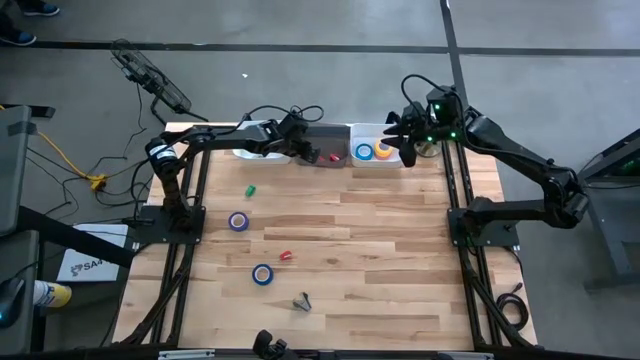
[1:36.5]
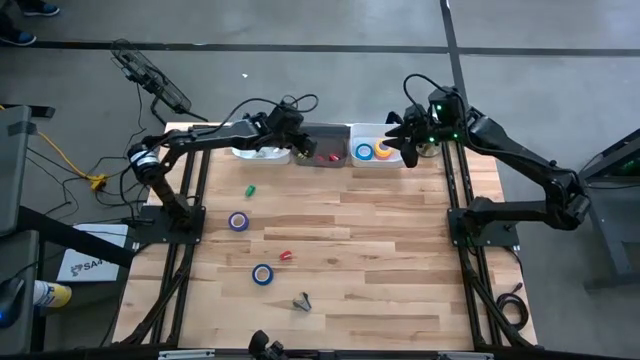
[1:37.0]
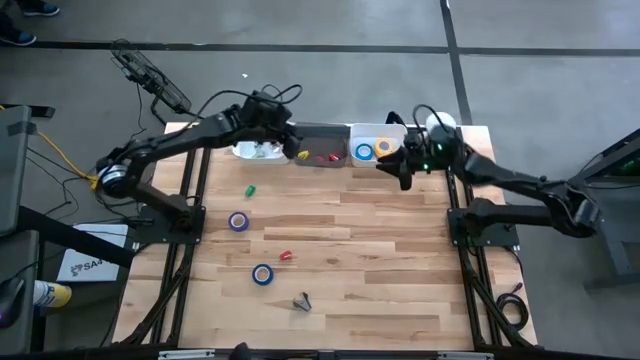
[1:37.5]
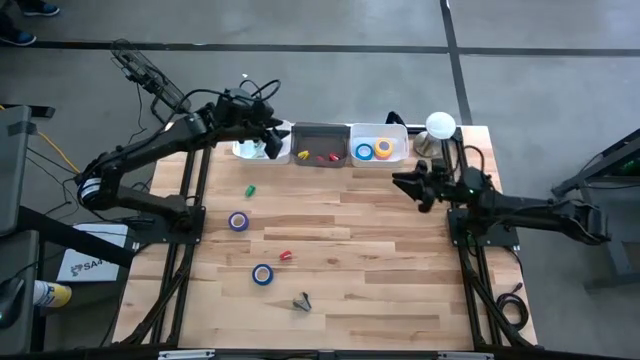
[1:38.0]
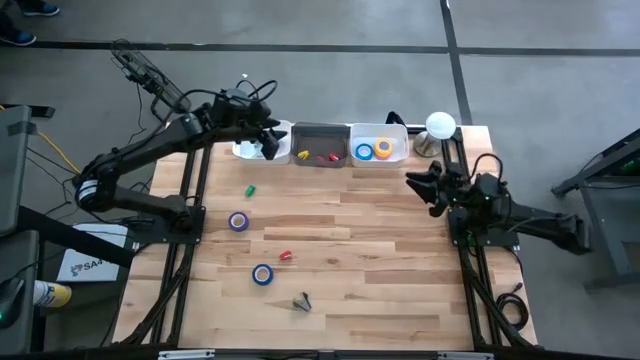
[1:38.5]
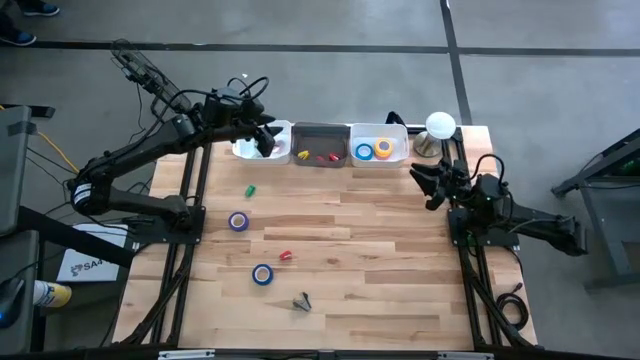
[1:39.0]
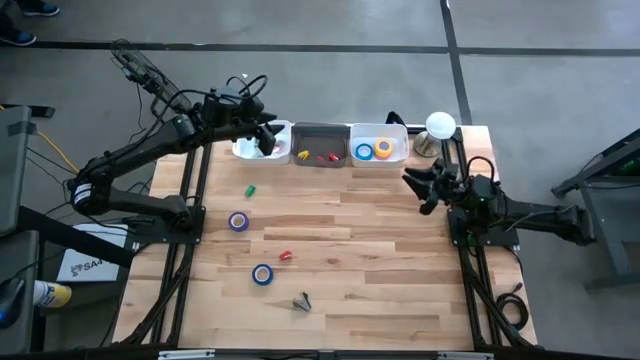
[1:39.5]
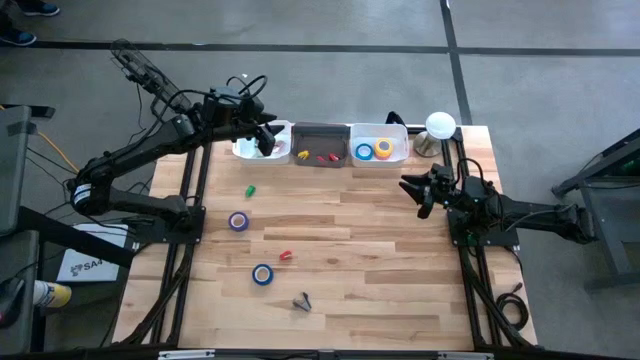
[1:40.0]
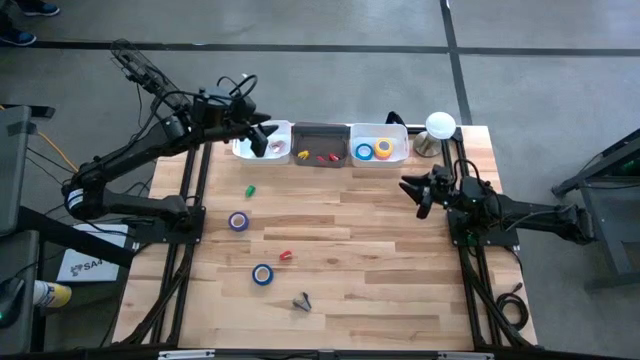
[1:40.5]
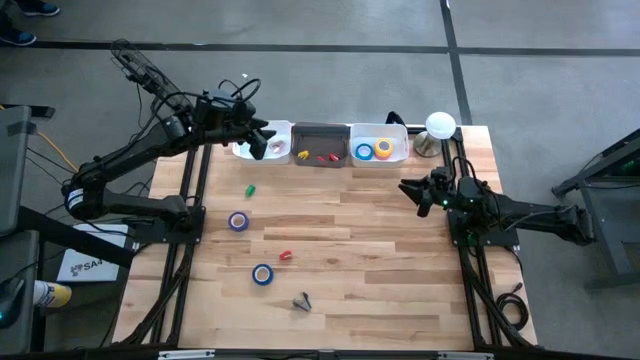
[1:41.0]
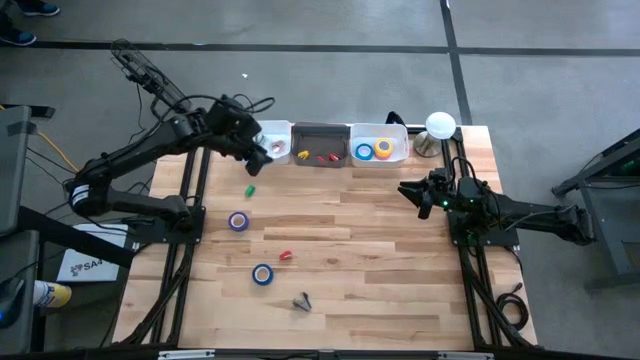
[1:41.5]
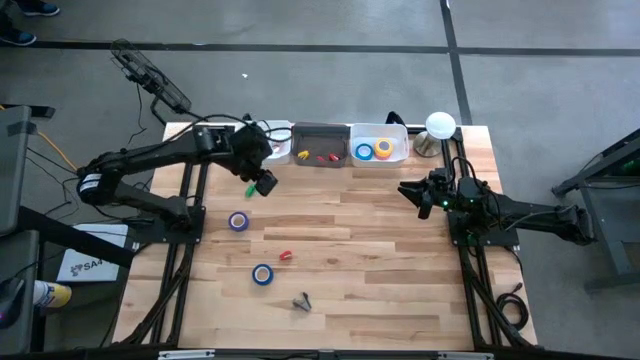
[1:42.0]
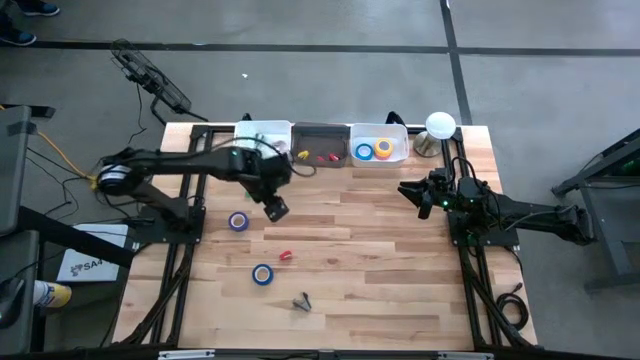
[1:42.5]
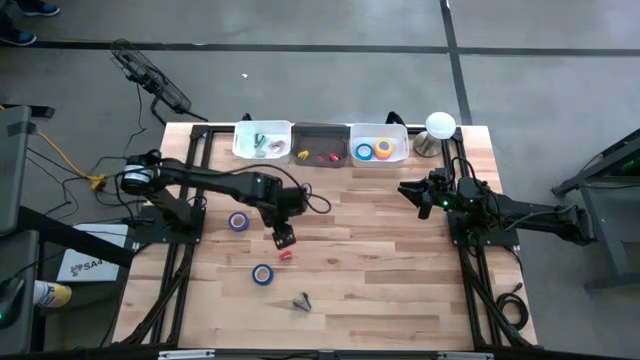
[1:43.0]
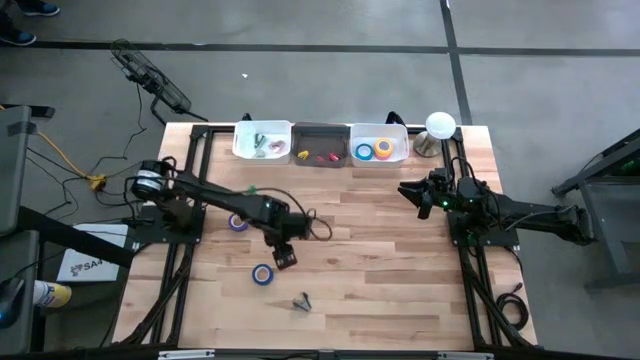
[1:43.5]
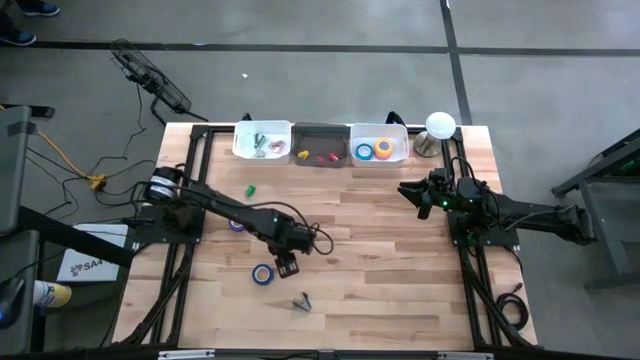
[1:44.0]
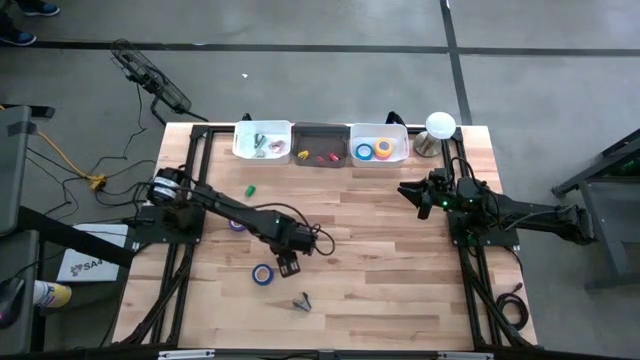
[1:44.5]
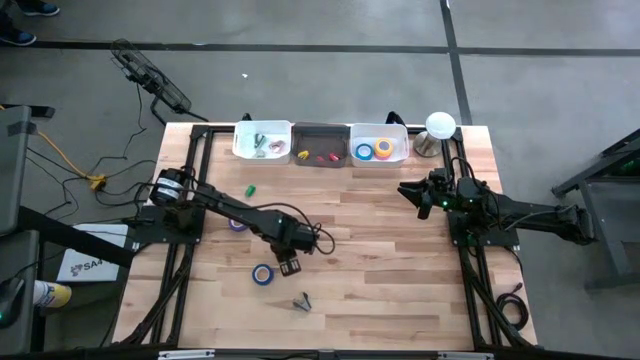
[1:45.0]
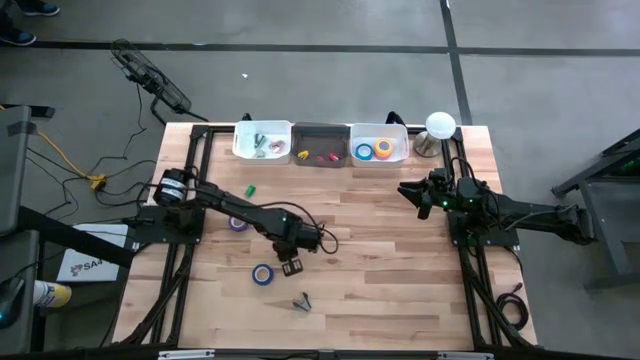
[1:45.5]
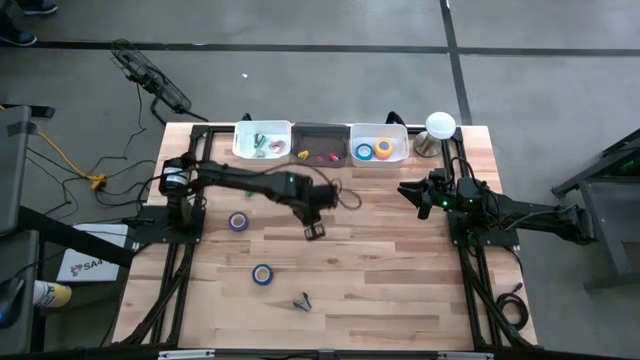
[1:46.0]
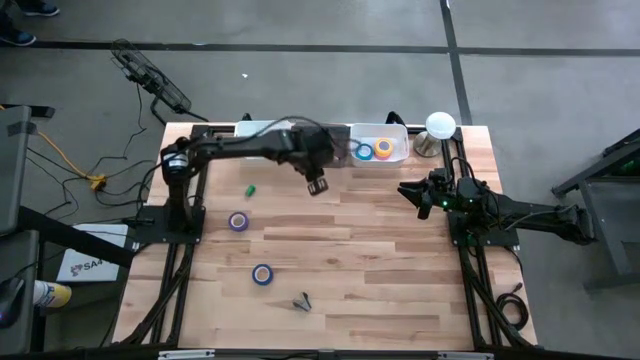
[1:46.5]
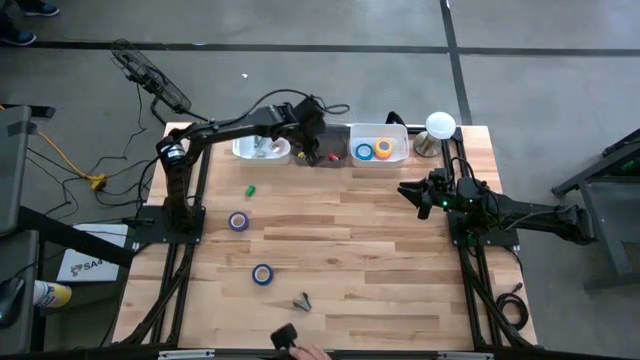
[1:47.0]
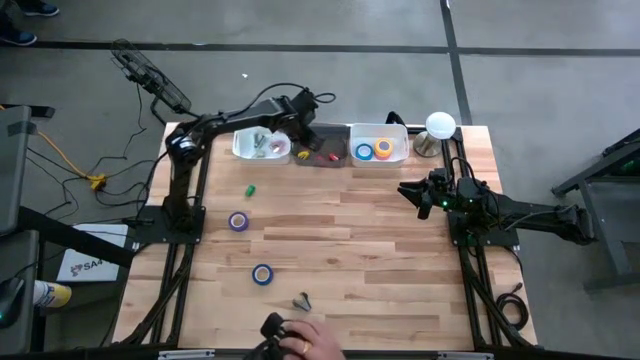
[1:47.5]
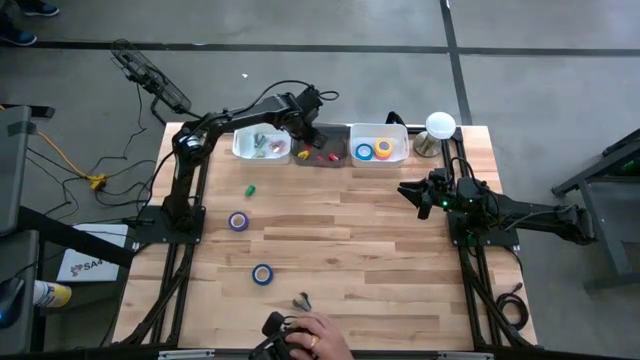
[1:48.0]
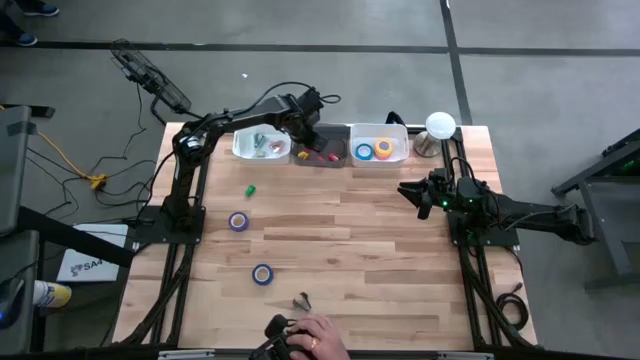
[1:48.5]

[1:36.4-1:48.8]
Task: Pick and place Stapler, Stapler remover, tape
Put the red stapler into the black transparent bin

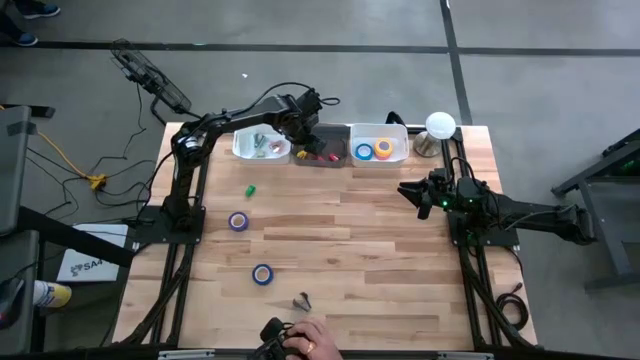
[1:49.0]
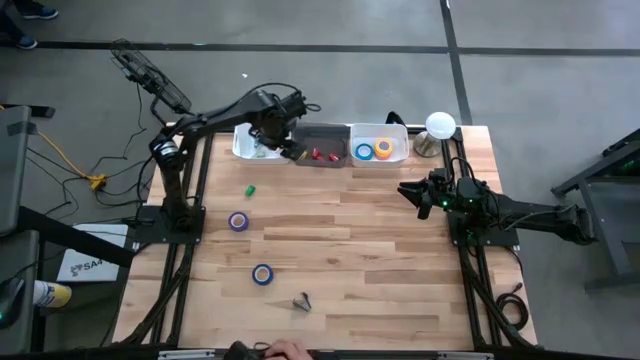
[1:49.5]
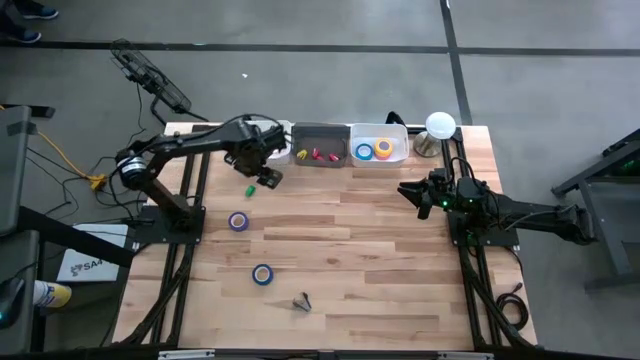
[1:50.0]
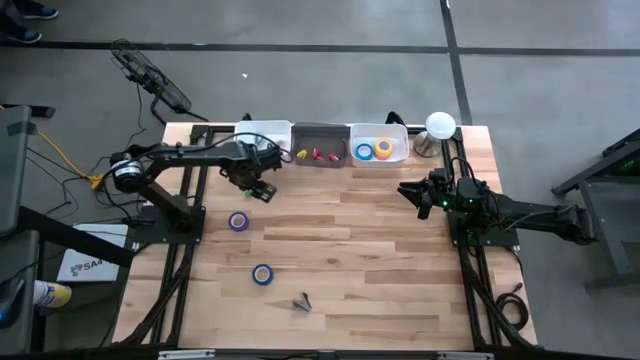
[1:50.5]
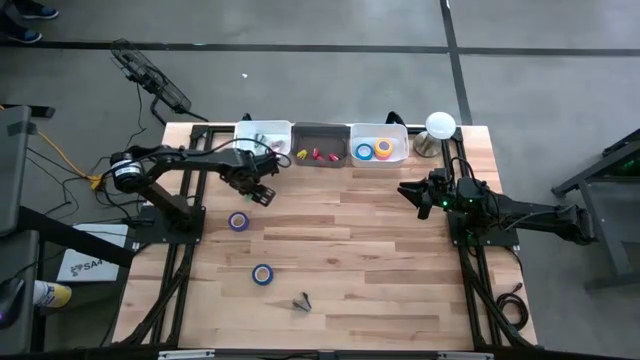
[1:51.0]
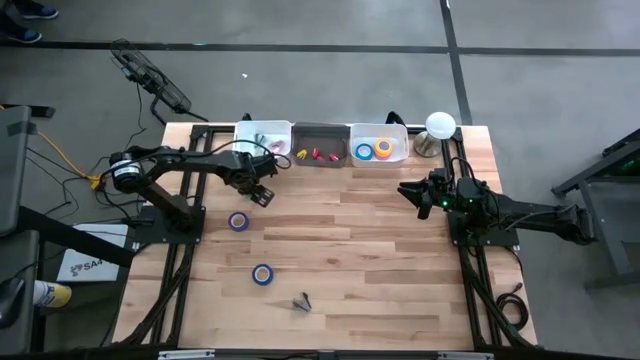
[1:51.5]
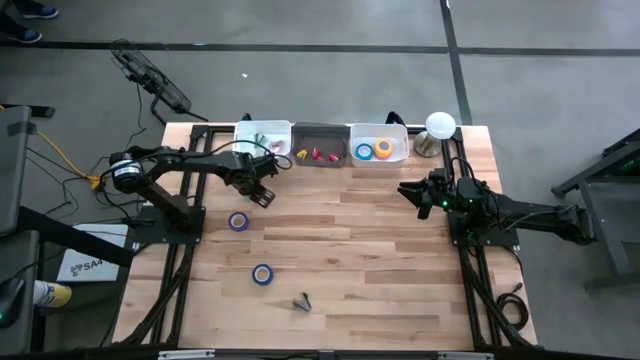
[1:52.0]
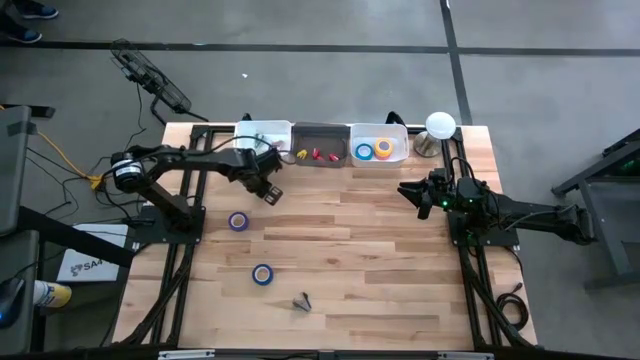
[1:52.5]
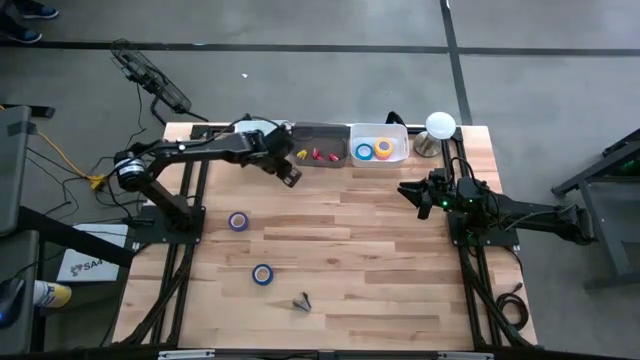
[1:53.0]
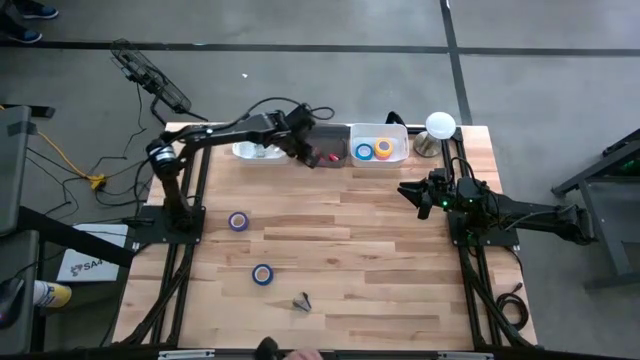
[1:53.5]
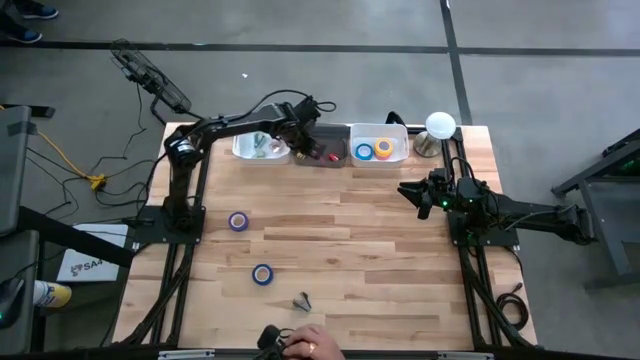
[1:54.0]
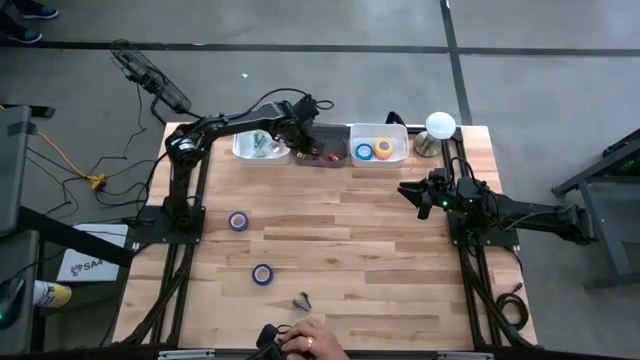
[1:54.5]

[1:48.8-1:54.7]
Put the green stapler into the black transparent bin

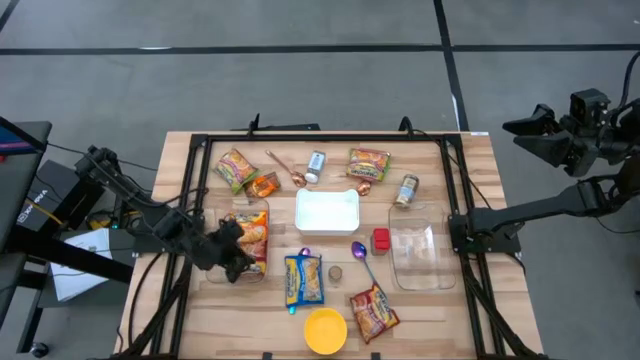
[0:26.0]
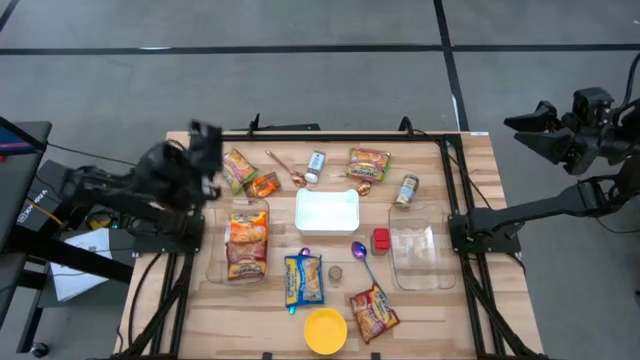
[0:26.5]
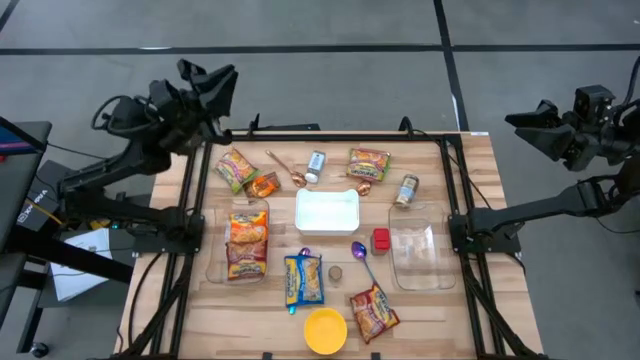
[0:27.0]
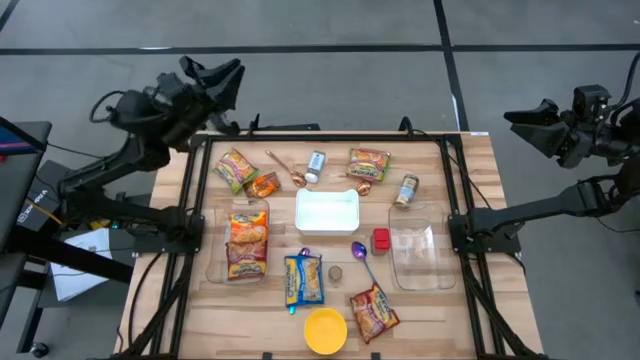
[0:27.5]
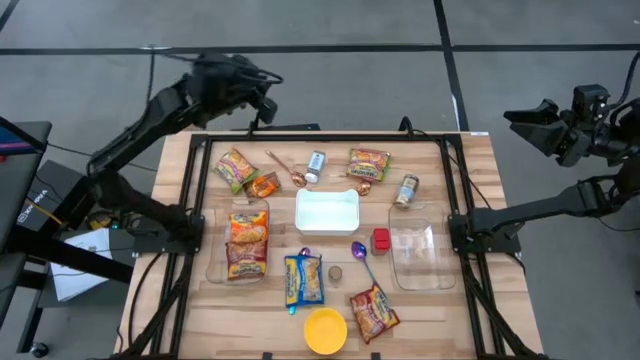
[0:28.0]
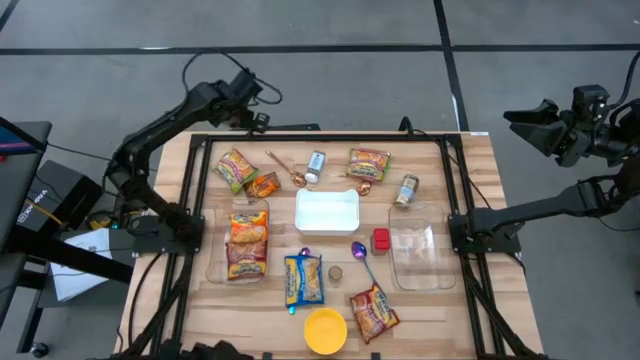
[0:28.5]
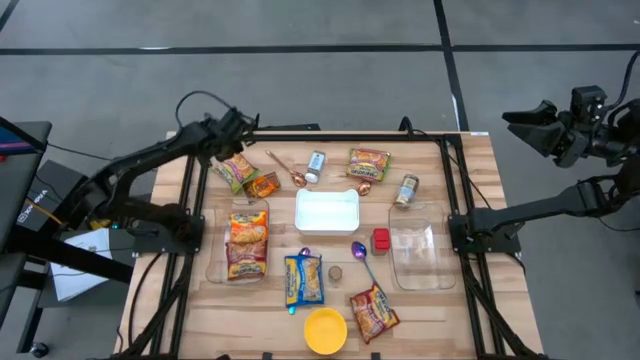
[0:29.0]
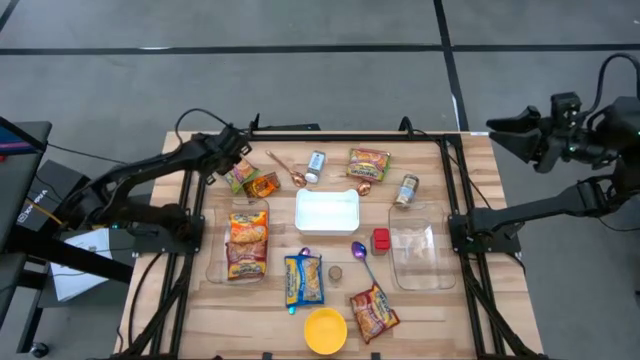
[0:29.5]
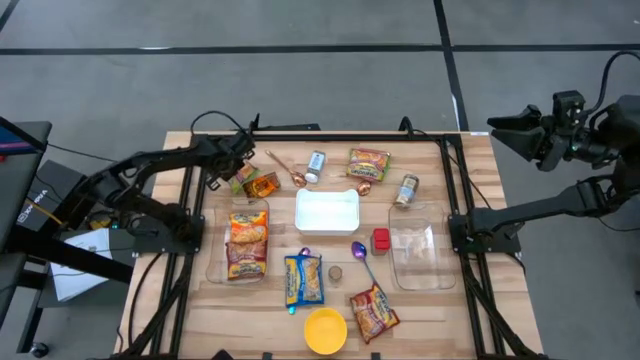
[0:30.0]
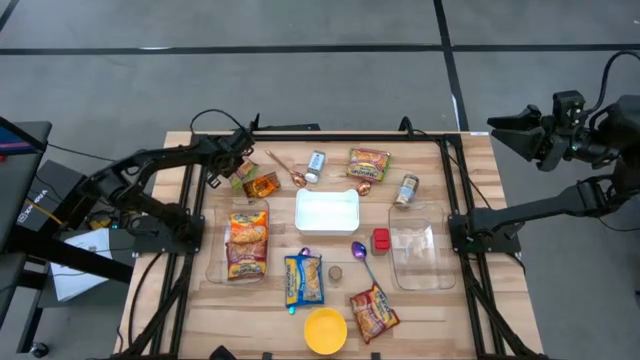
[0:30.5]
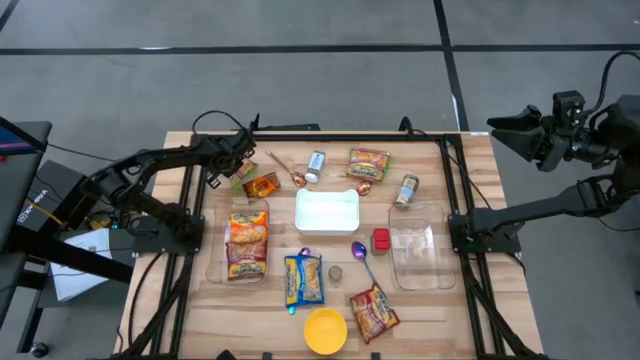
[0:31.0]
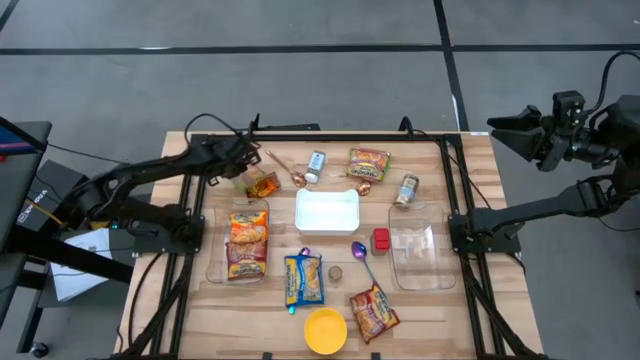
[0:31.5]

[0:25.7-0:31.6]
Task: Pick & Place Food Item
Put the left green noodle pack into the left transparent bin
